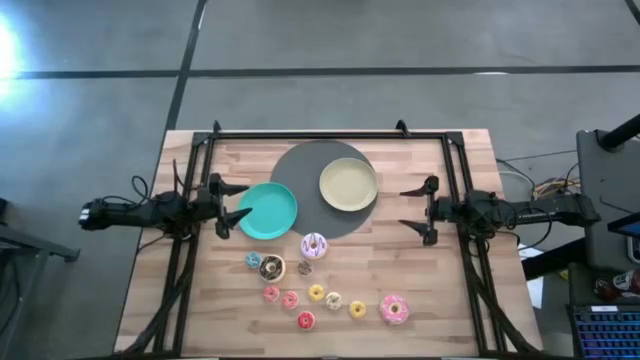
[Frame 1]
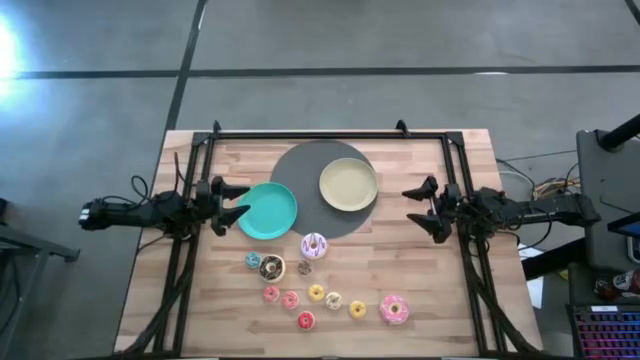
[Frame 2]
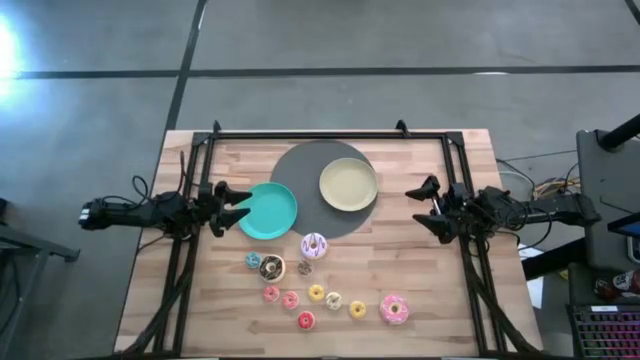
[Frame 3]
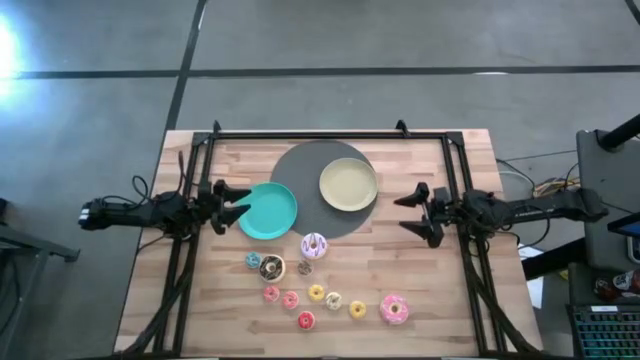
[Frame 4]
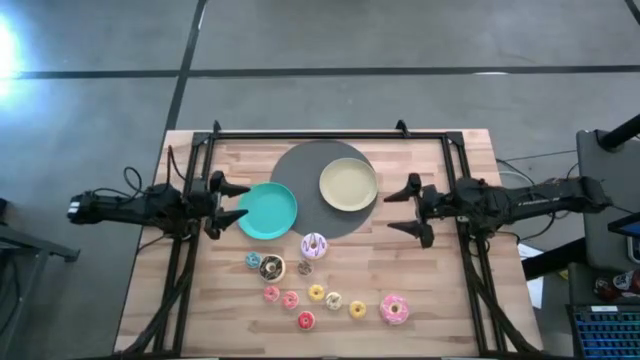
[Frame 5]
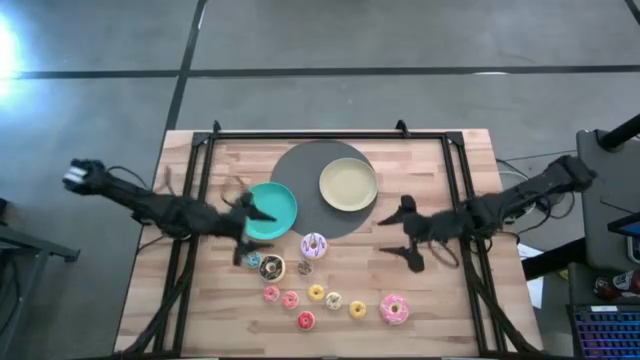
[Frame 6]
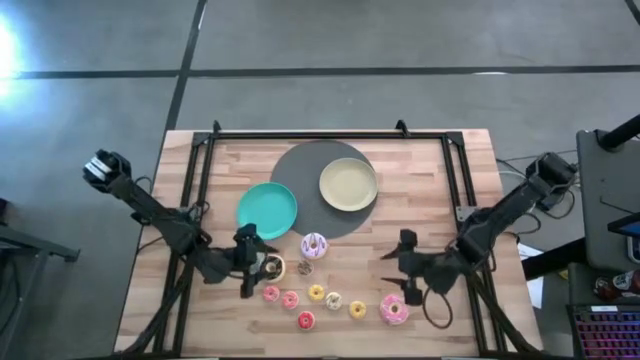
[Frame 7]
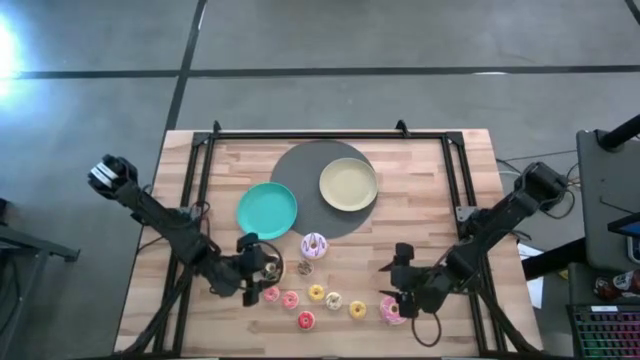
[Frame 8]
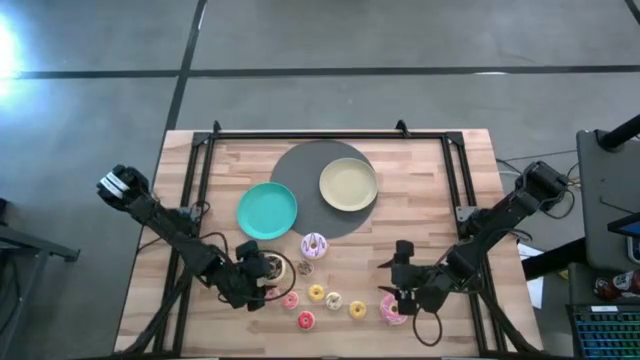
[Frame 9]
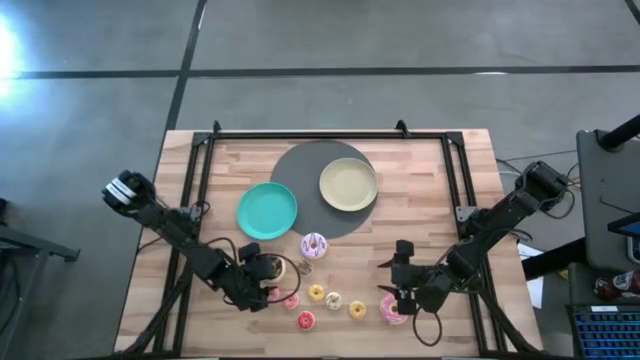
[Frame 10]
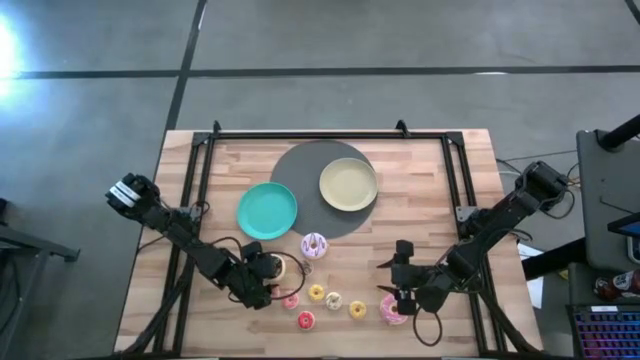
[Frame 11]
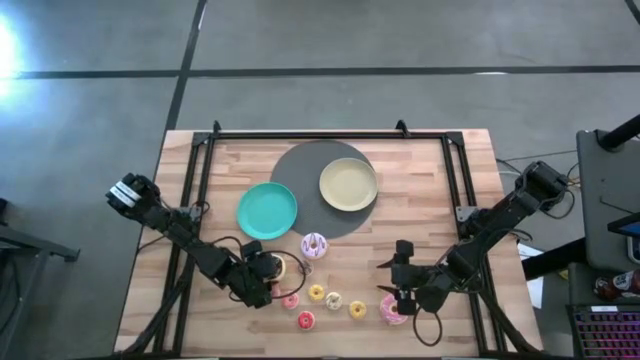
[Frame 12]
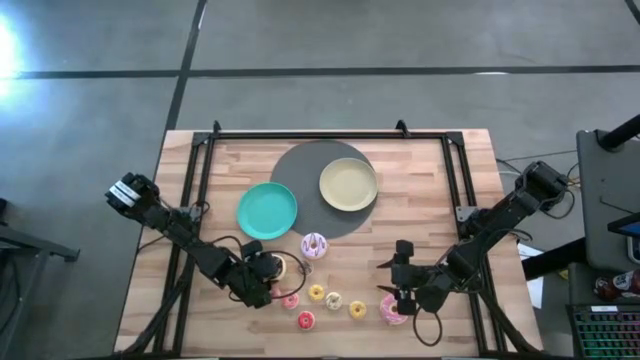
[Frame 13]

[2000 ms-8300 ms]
Task: Pick & Place donuts
Put the large black donut on the green plate

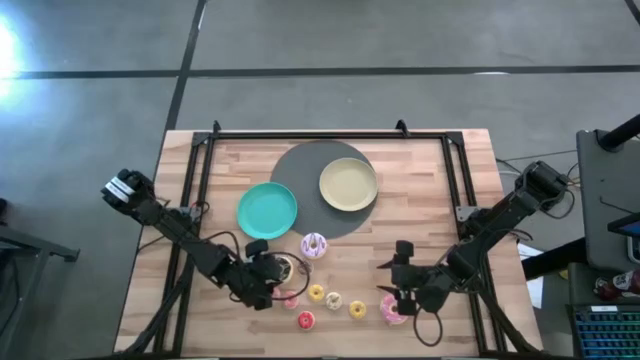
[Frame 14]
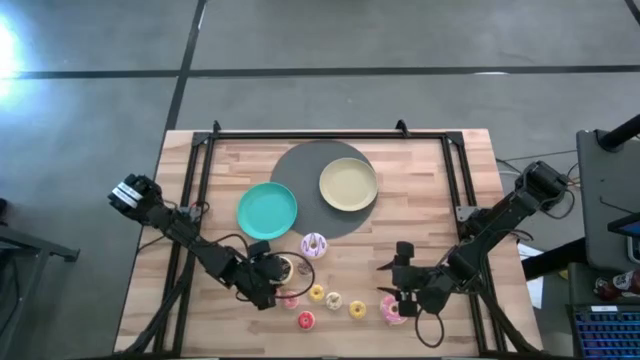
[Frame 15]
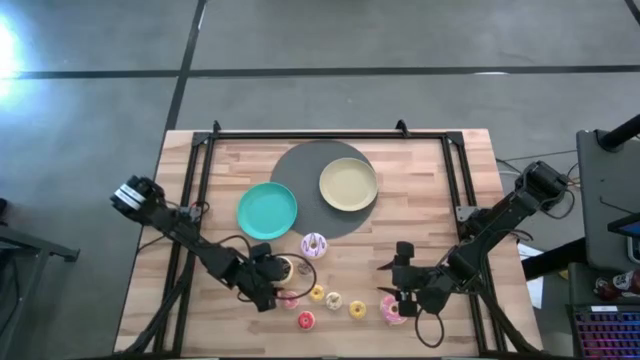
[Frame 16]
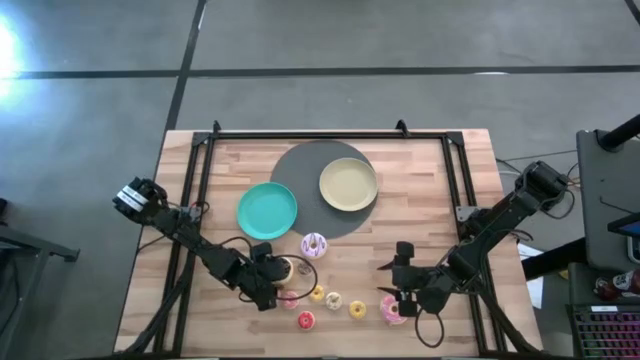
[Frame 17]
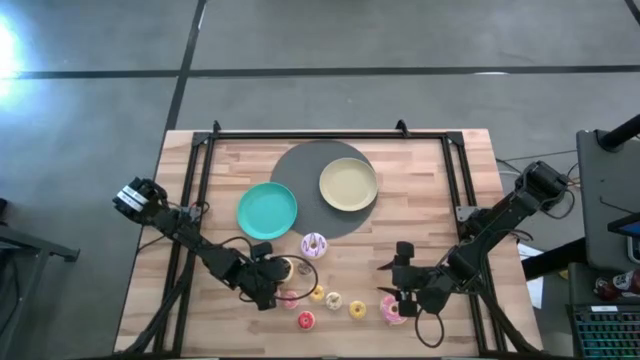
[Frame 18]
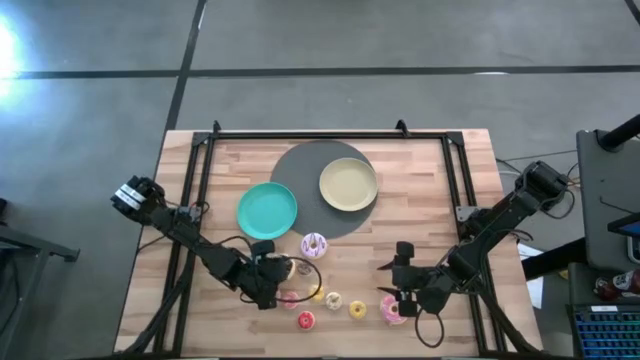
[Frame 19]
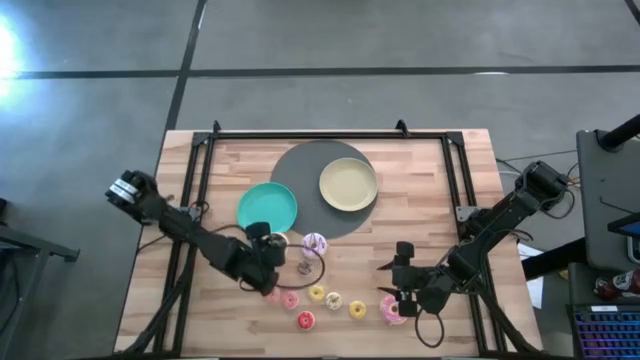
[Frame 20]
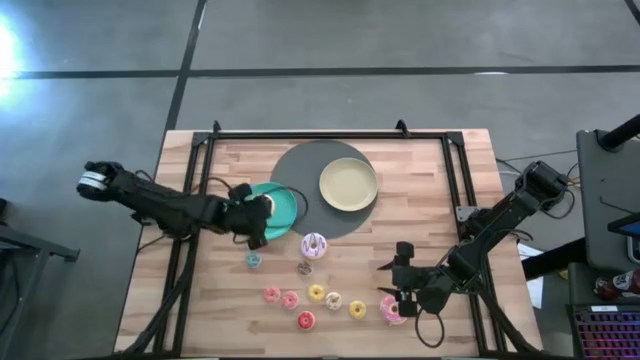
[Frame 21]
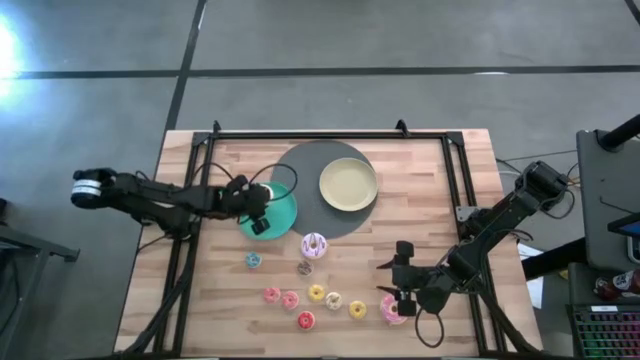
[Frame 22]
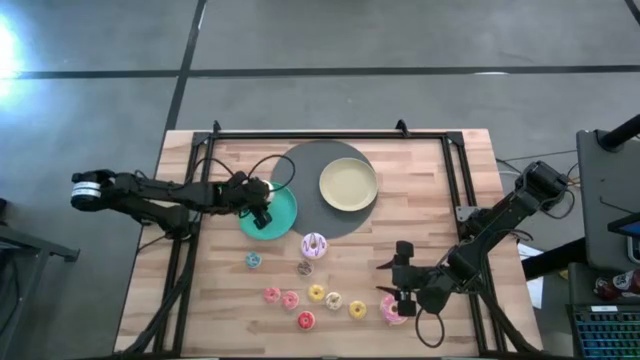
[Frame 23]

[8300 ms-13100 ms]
Put the large black donut on the green plate

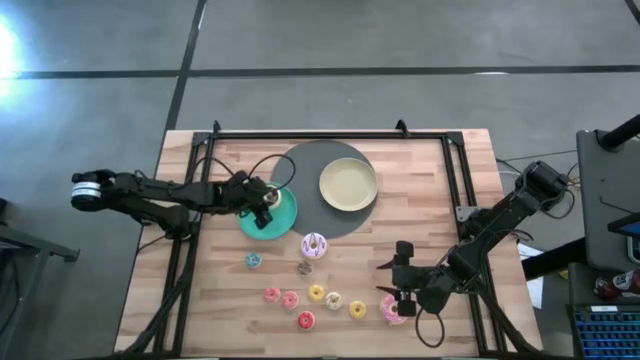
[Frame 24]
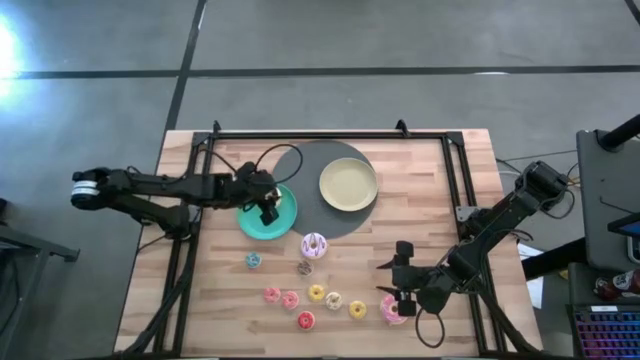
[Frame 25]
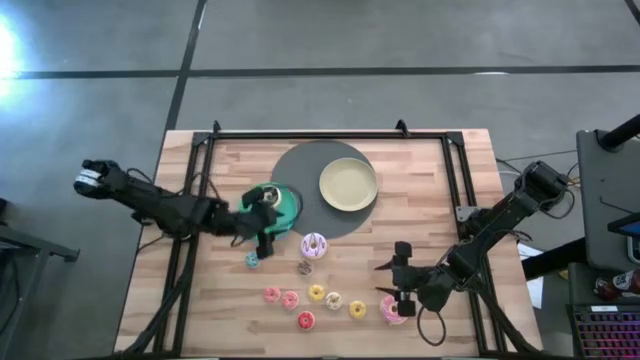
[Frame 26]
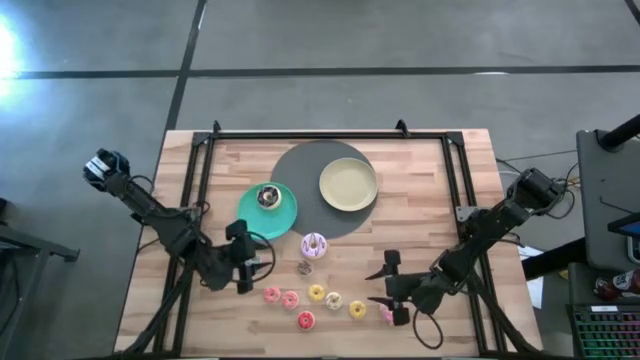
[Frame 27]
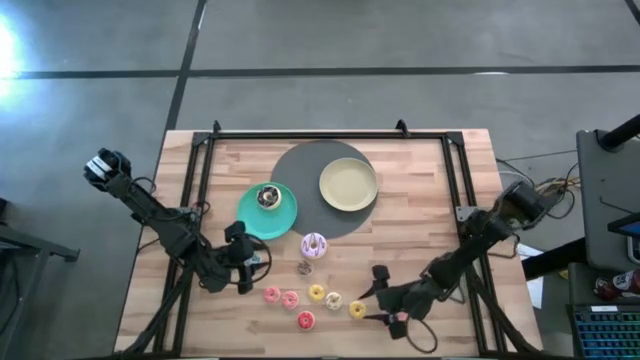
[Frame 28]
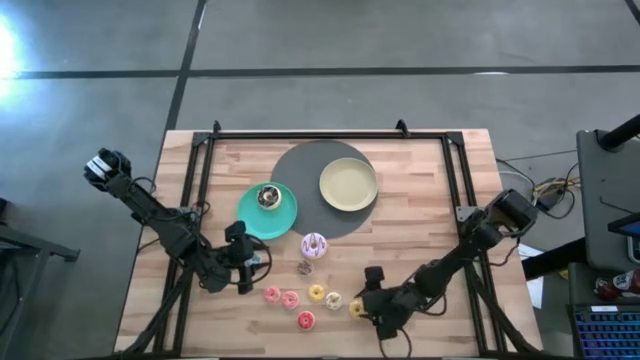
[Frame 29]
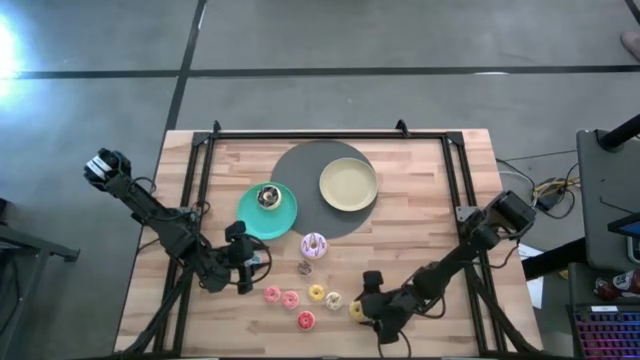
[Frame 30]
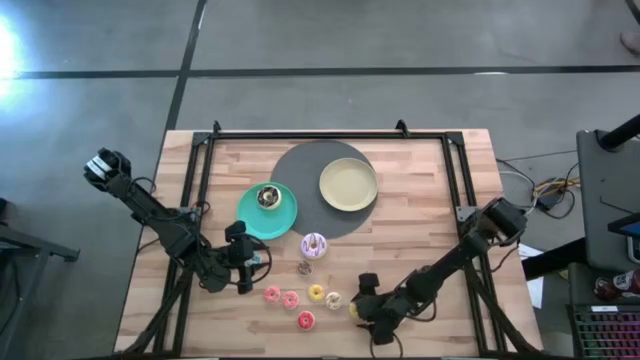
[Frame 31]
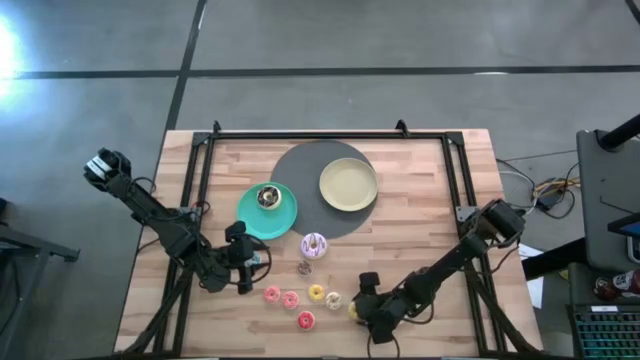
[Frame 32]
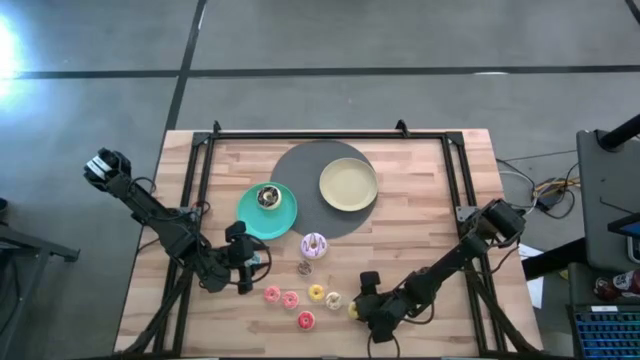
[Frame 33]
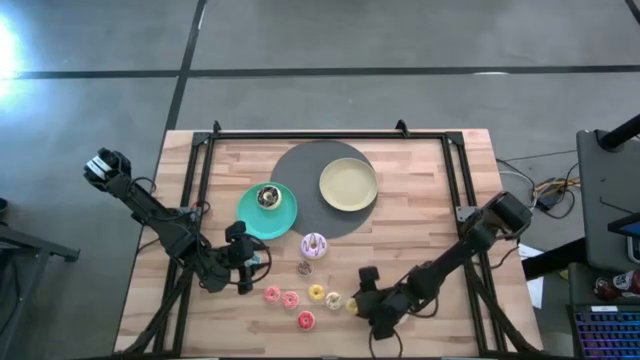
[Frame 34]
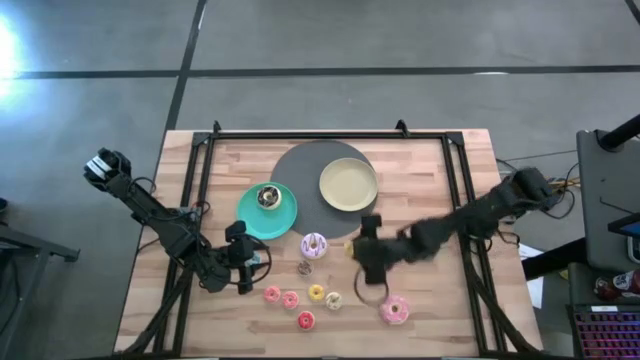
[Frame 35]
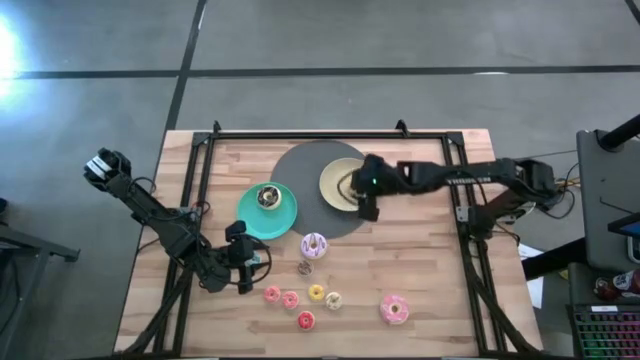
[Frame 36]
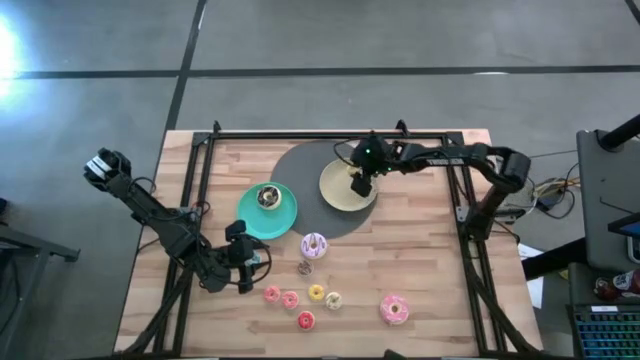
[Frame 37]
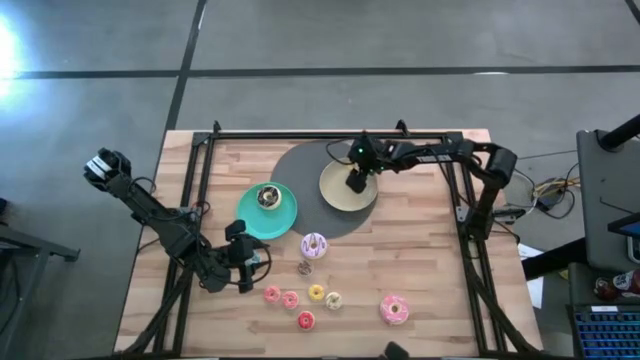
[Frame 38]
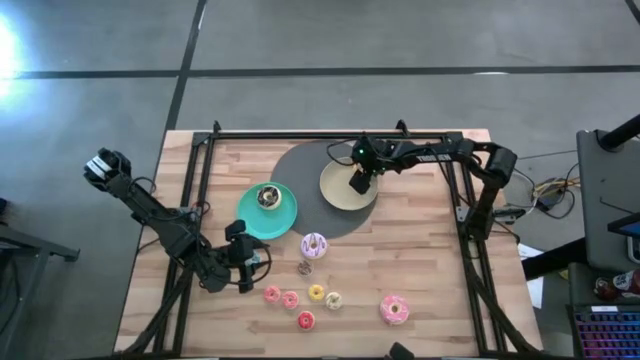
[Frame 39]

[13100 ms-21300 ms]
Put the right small yellow donut on the brown plate

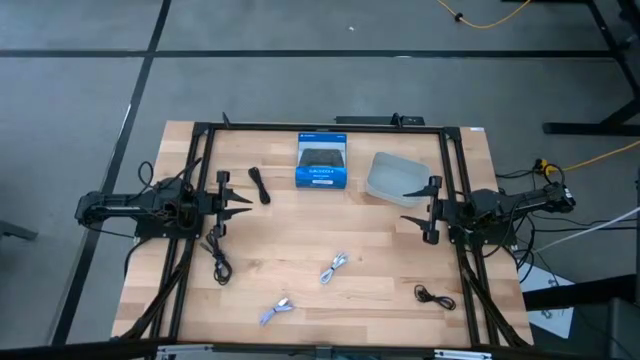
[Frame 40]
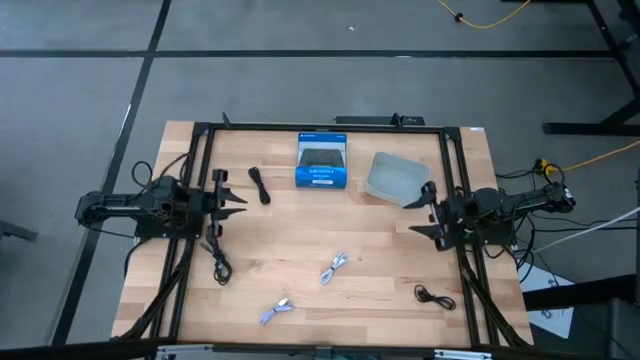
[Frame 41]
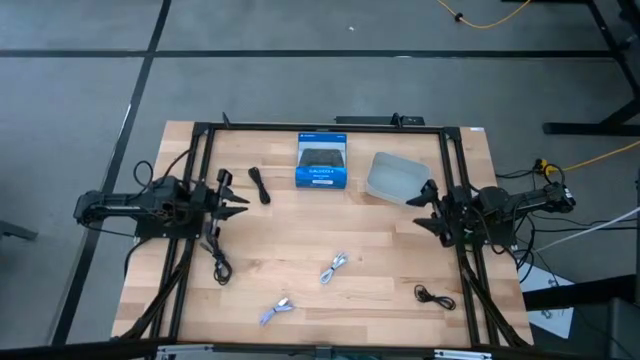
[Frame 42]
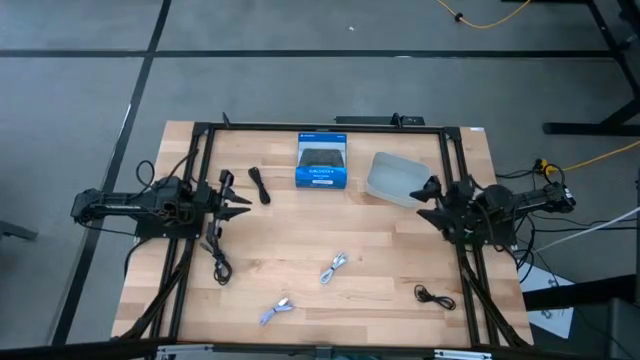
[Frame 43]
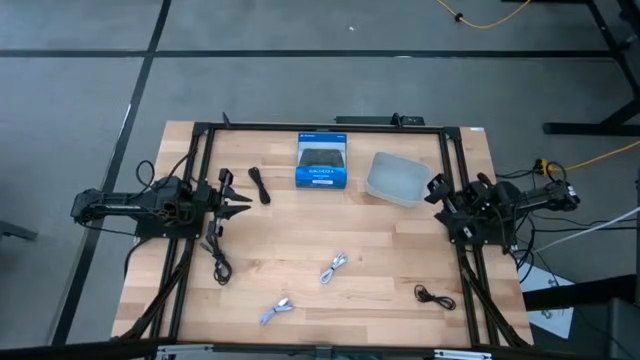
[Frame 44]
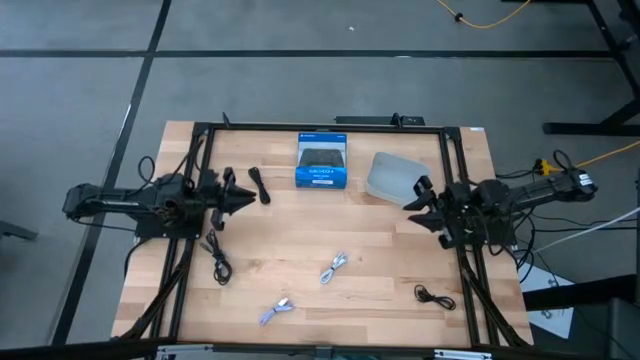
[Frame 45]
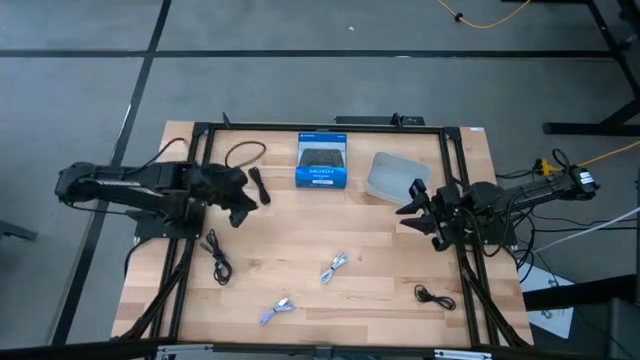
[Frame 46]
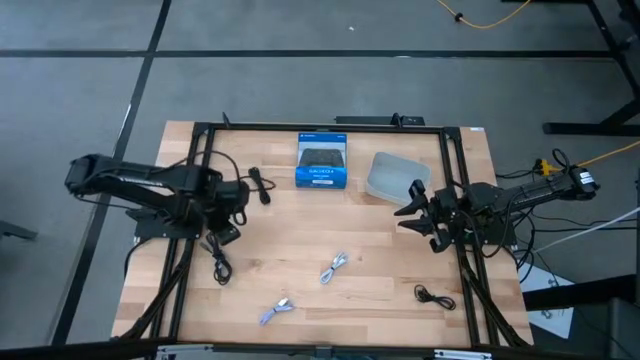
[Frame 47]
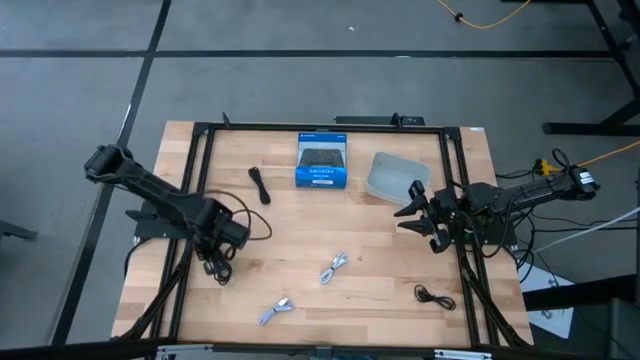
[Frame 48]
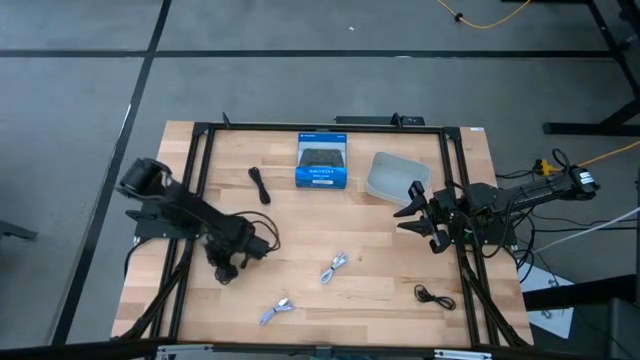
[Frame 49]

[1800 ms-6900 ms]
Task: Pick and place USB-C Cables
Move the bottom left black charger cable to the center of the table
